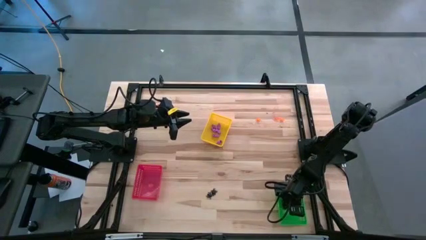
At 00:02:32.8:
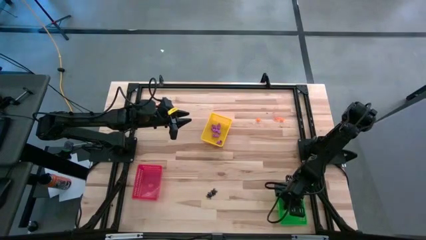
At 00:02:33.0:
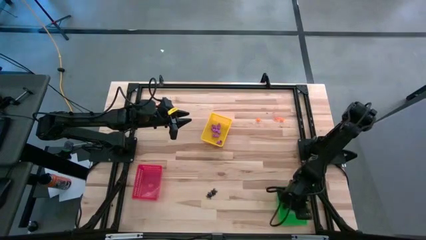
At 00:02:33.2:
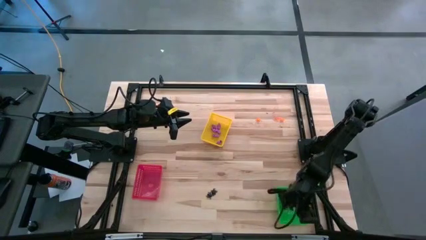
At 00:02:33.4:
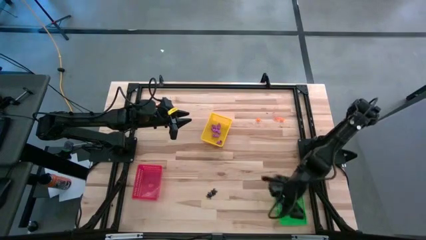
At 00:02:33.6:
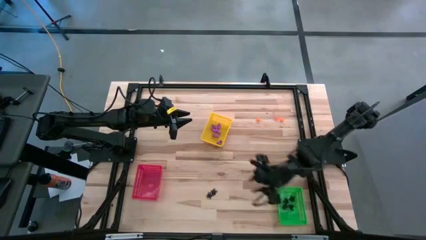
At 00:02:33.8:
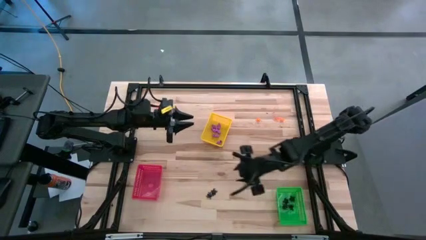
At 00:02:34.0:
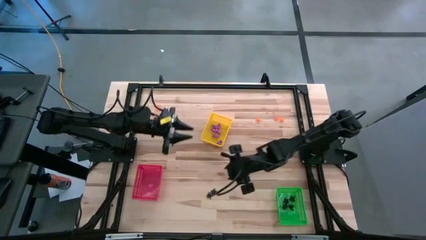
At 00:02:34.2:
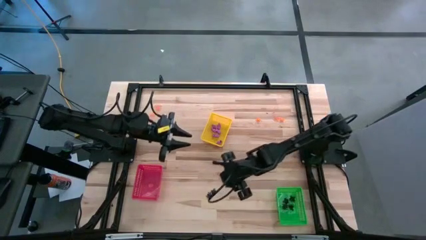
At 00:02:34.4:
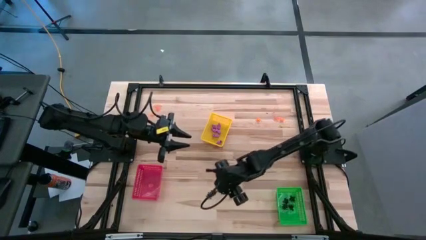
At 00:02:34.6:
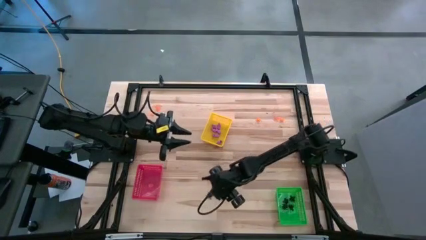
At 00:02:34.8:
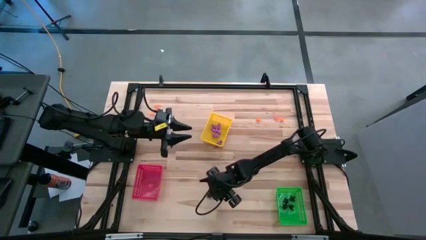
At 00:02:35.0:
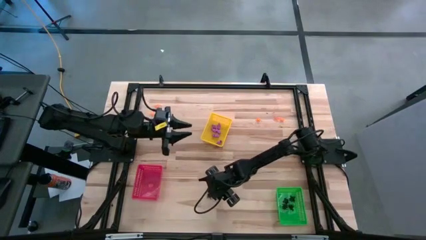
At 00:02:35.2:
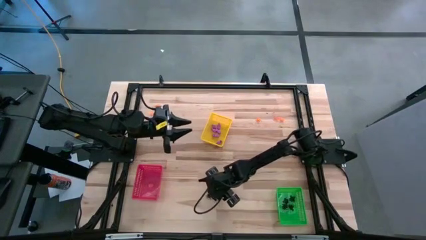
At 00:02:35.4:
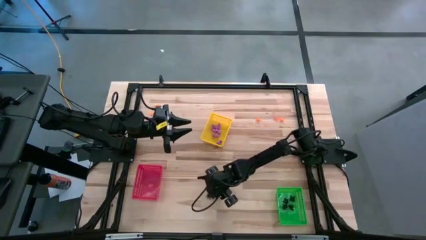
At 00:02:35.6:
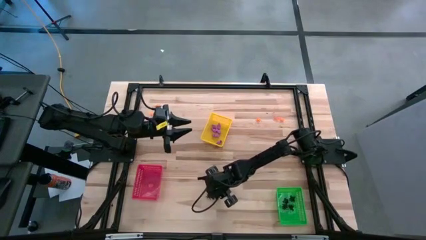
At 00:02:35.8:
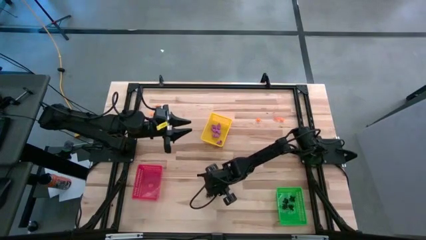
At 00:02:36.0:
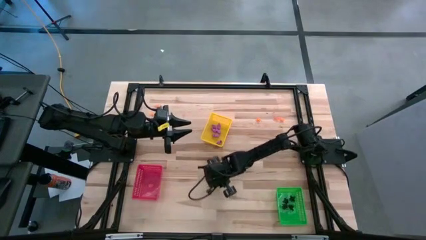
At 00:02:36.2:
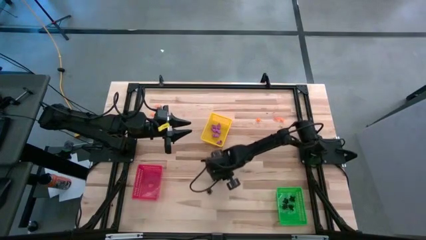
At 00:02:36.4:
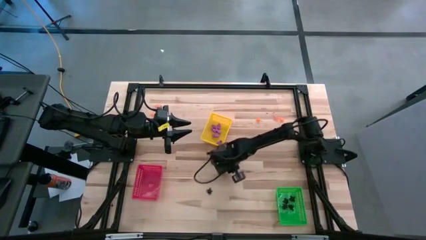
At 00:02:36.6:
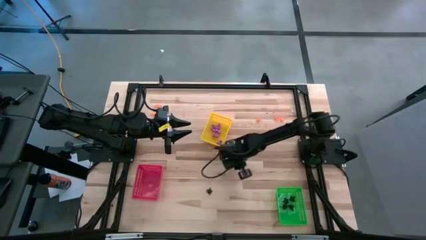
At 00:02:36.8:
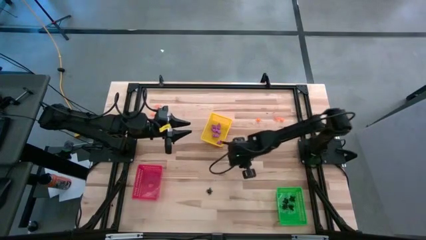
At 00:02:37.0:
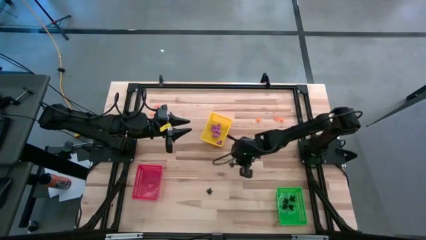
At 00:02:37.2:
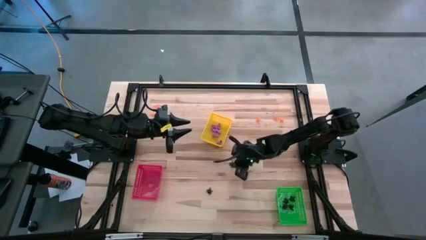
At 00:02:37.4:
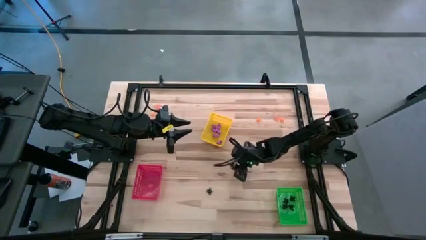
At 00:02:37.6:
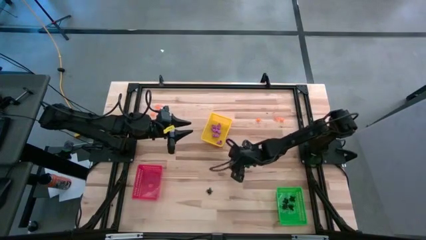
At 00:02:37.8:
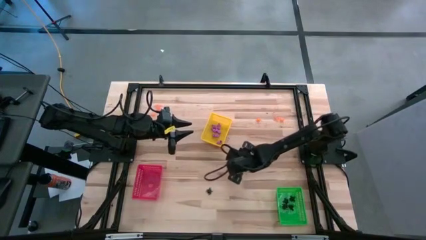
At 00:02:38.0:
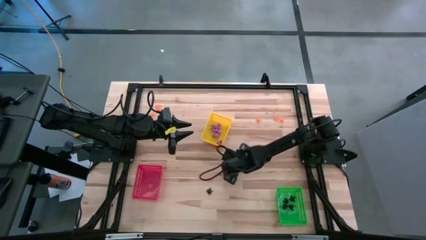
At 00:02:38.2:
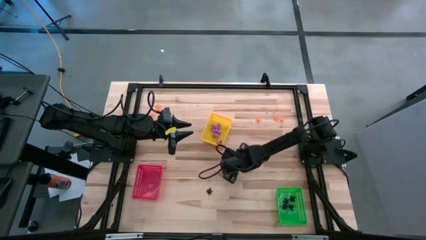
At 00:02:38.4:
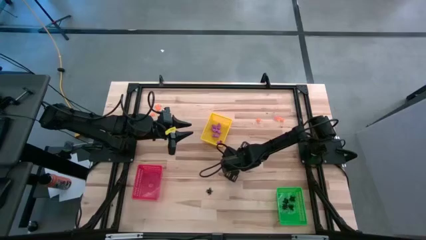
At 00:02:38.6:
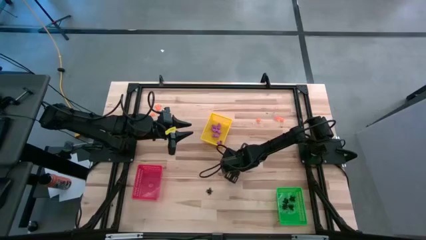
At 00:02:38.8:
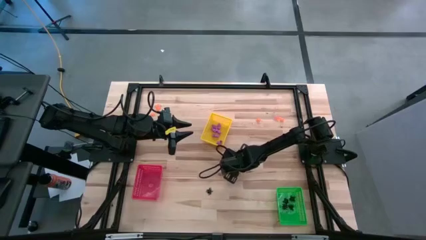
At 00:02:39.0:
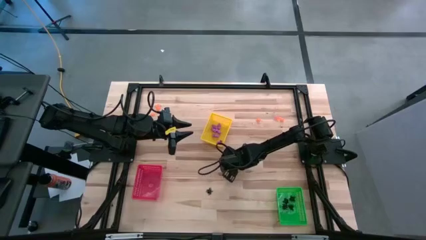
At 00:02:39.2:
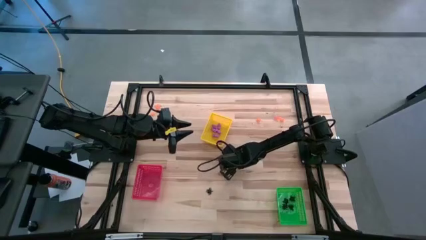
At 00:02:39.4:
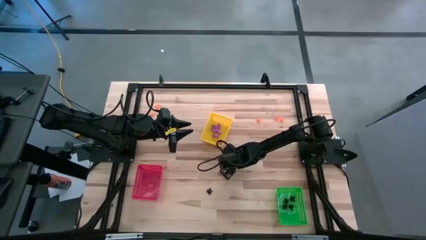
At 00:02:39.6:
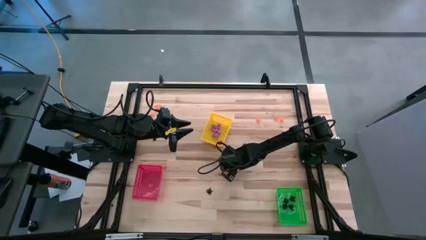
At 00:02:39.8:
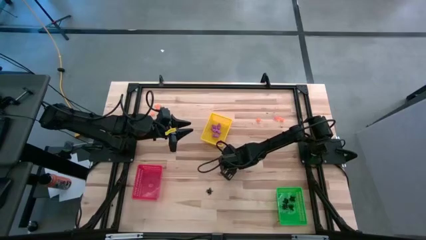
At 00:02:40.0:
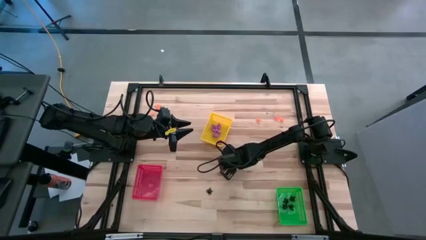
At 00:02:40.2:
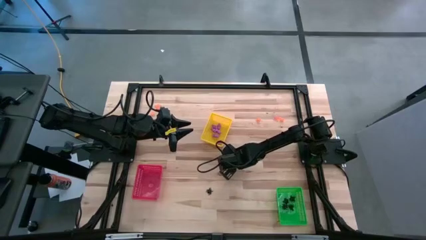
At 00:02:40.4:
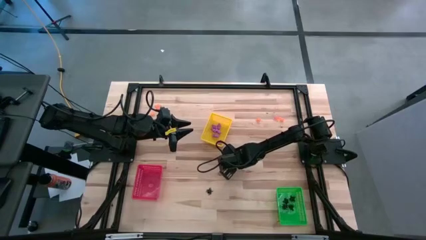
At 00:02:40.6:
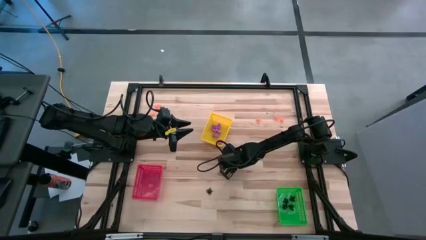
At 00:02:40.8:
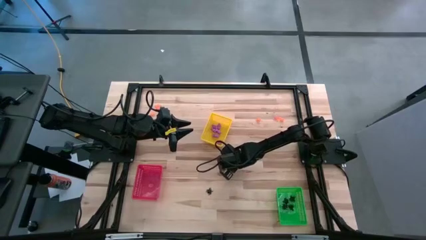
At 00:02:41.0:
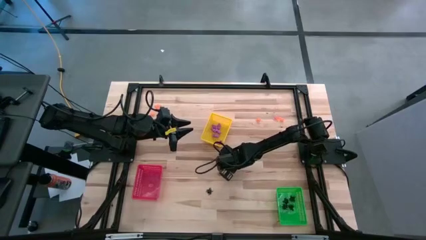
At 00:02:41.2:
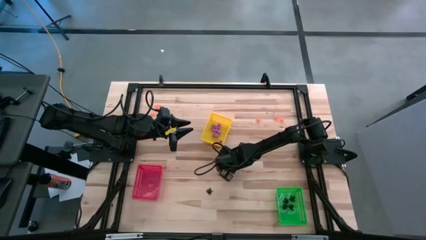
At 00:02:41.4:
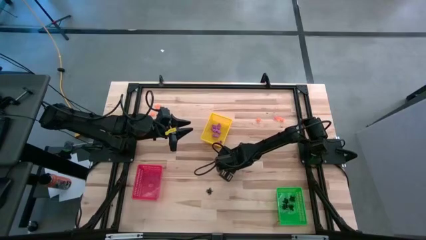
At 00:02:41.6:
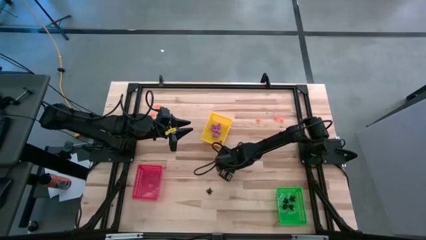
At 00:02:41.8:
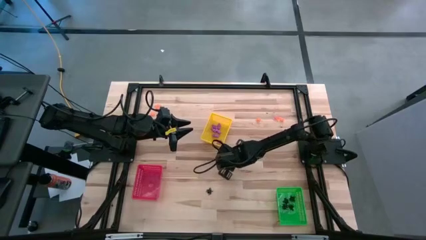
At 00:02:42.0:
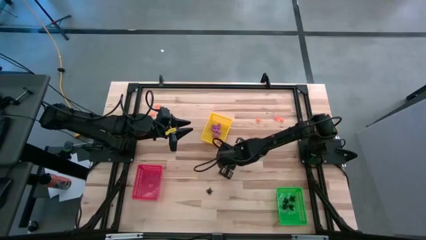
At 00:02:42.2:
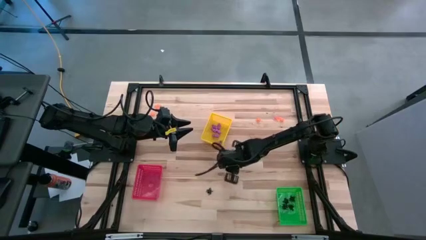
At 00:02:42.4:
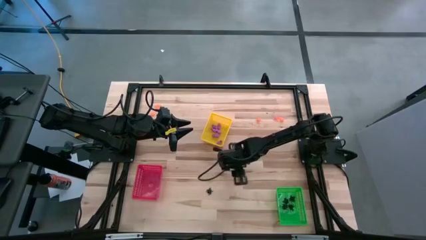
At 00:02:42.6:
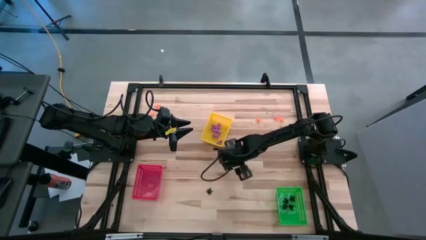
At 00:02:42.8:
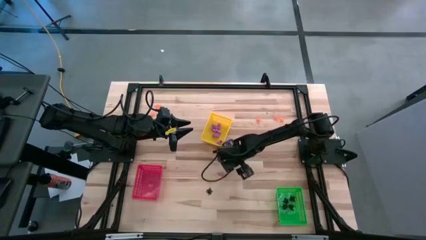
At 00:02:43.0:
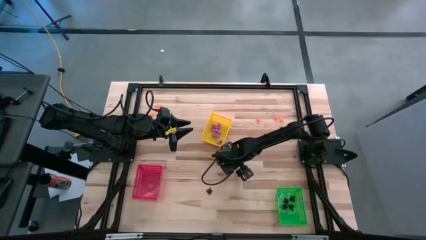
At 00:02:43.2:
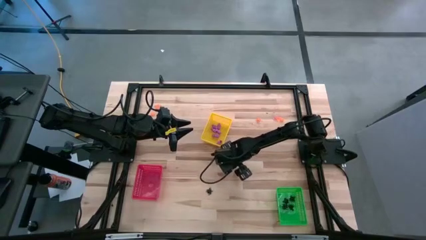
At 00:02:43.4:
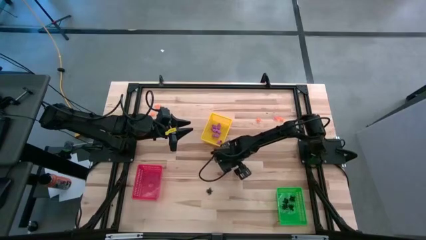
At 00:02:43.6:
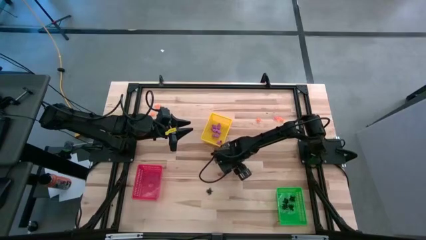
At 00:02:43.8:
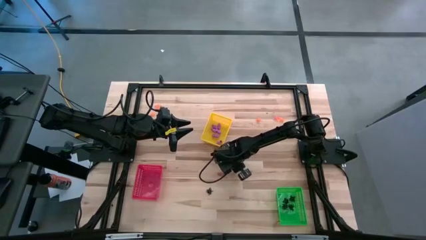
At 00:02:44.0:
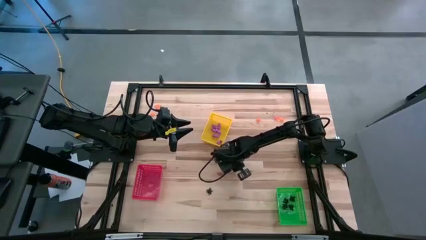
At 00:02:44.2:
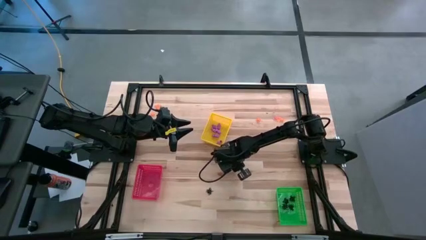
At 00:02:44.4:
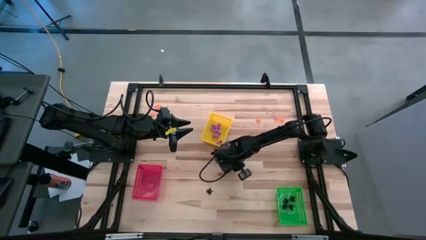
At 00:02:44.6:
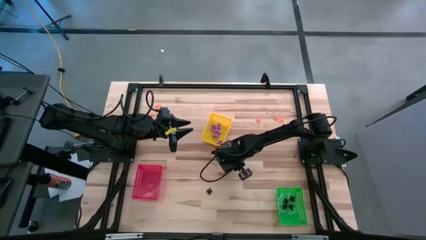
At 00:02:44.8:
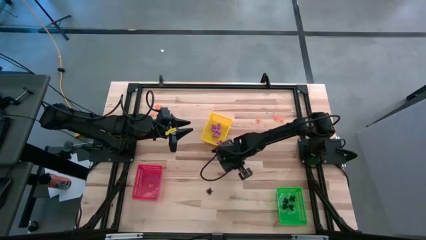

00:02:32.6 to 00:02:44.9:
Task: Sort Halloween decoration
Put the right black spider toy into the green bin
